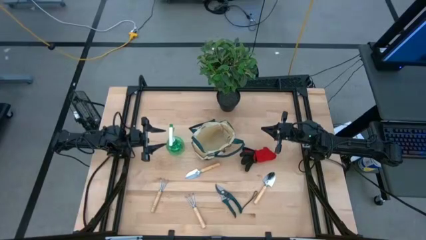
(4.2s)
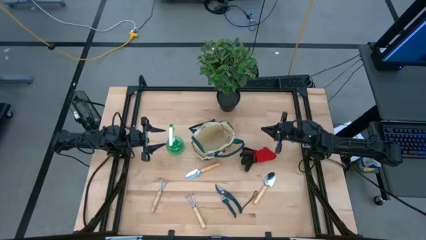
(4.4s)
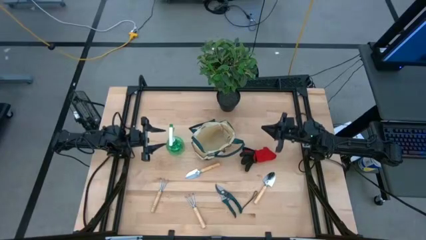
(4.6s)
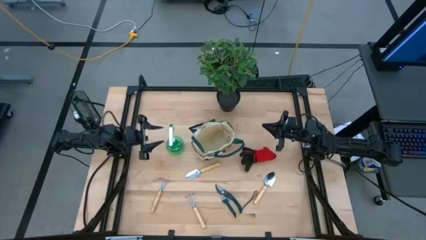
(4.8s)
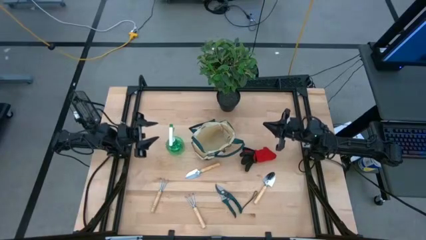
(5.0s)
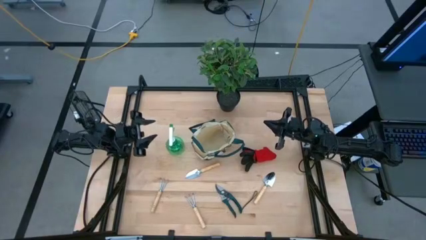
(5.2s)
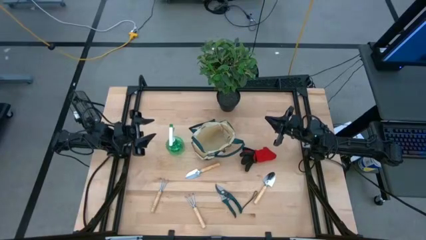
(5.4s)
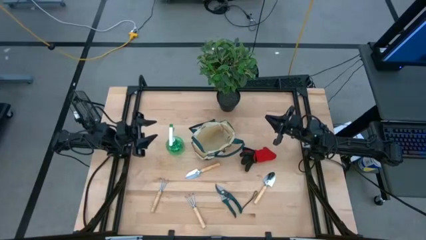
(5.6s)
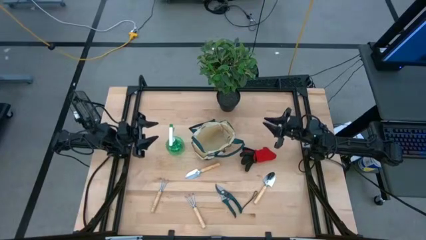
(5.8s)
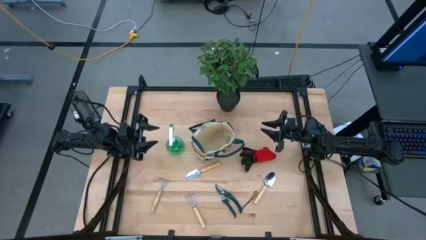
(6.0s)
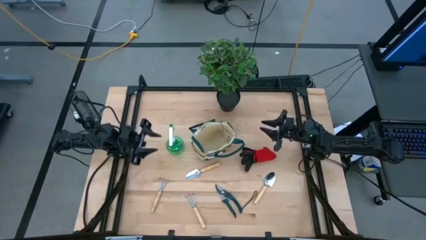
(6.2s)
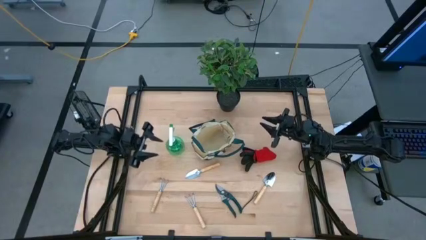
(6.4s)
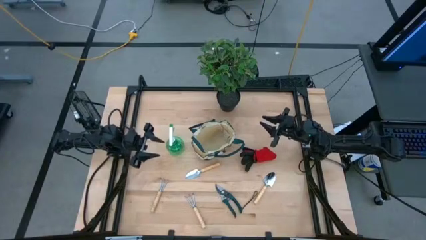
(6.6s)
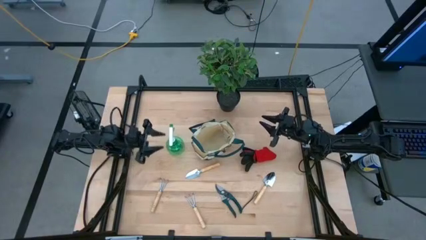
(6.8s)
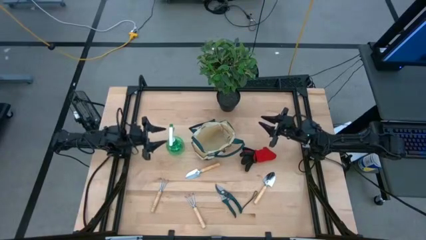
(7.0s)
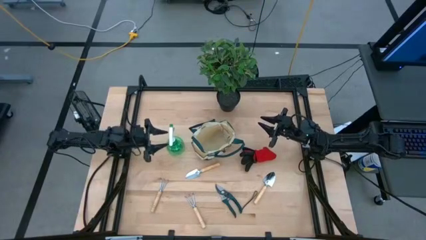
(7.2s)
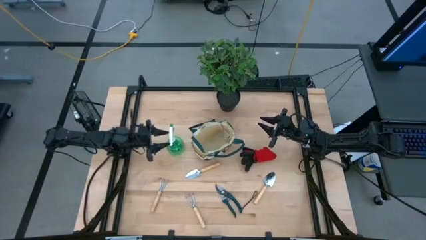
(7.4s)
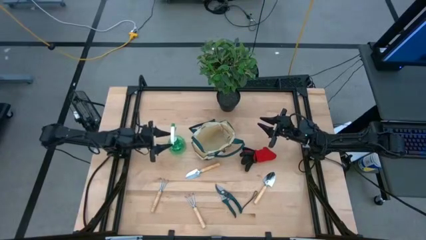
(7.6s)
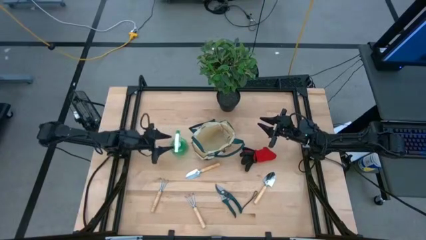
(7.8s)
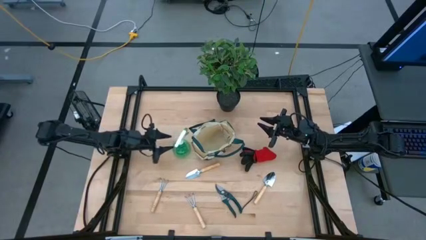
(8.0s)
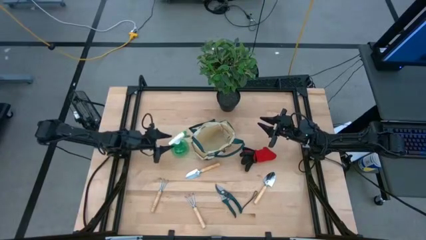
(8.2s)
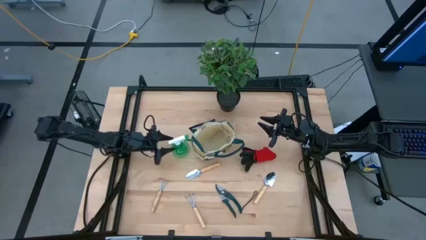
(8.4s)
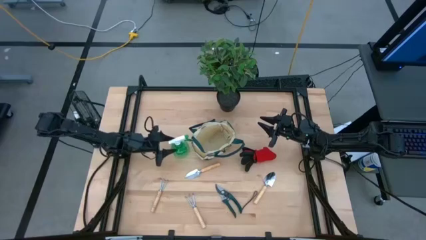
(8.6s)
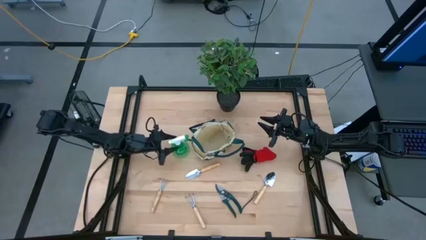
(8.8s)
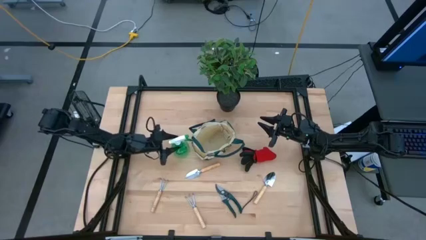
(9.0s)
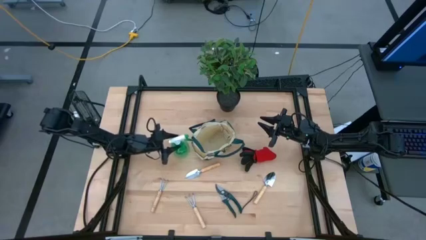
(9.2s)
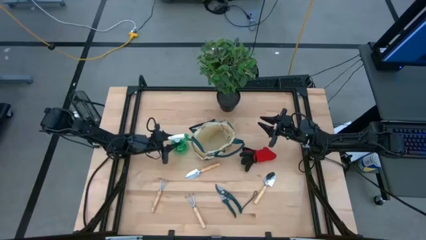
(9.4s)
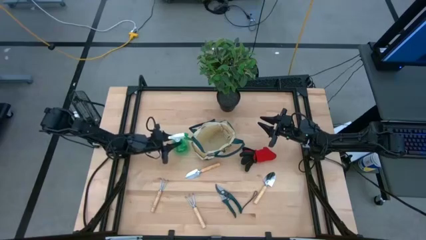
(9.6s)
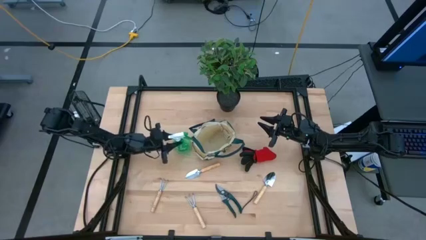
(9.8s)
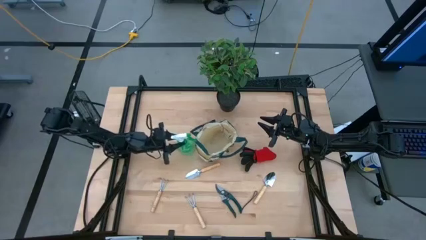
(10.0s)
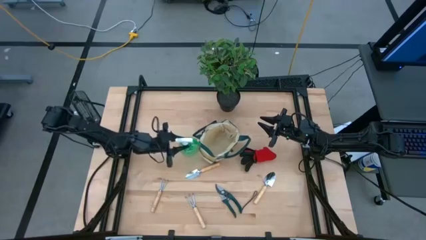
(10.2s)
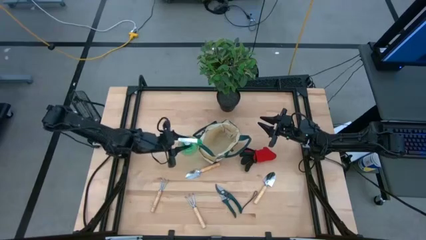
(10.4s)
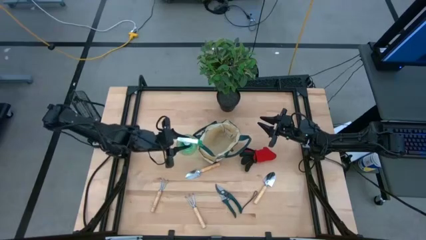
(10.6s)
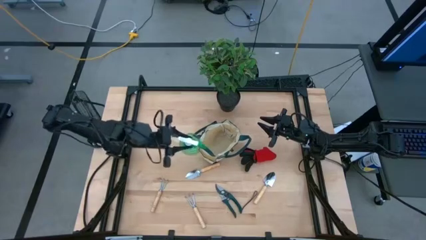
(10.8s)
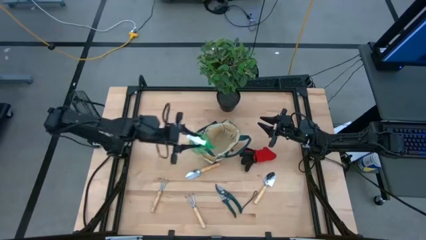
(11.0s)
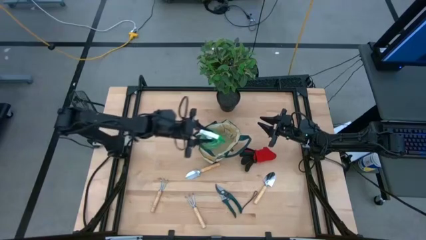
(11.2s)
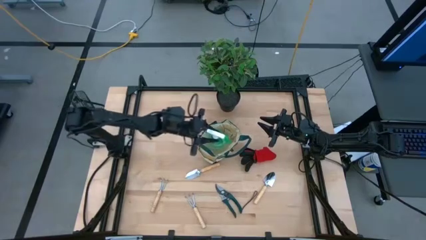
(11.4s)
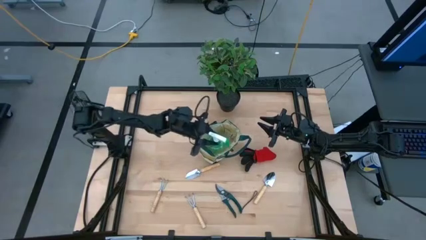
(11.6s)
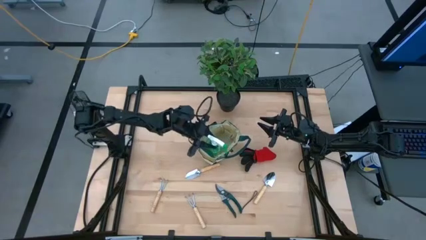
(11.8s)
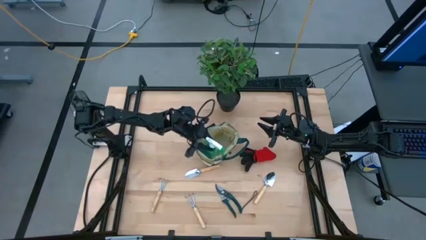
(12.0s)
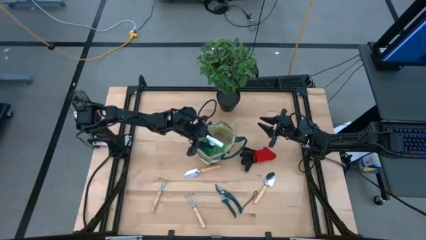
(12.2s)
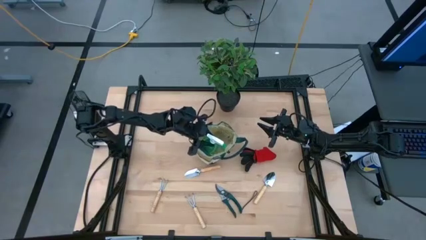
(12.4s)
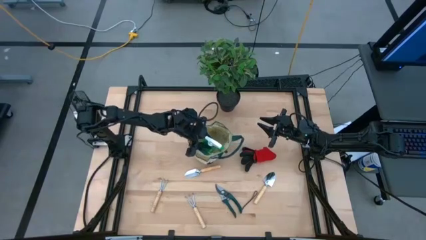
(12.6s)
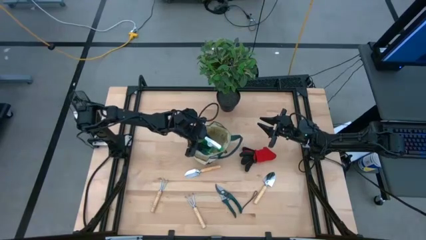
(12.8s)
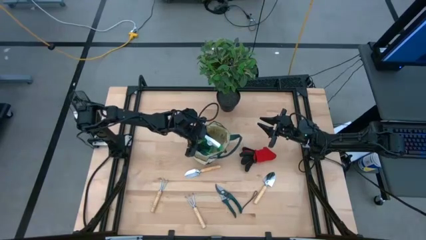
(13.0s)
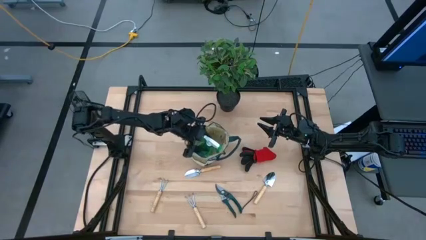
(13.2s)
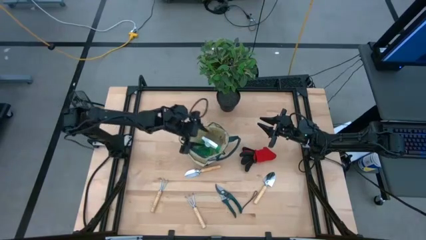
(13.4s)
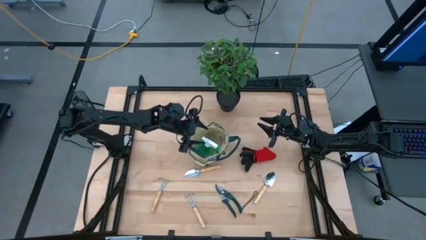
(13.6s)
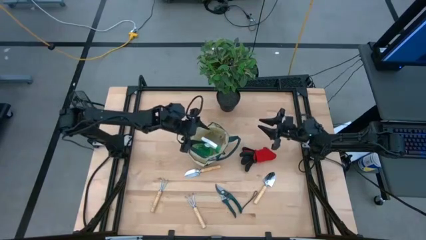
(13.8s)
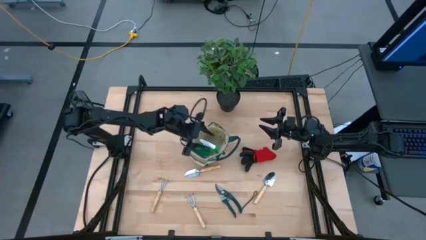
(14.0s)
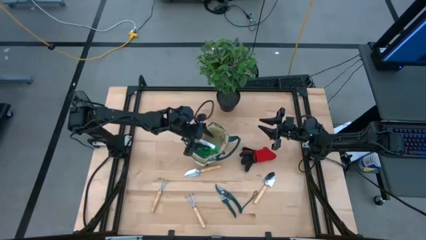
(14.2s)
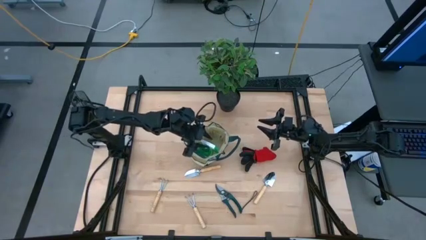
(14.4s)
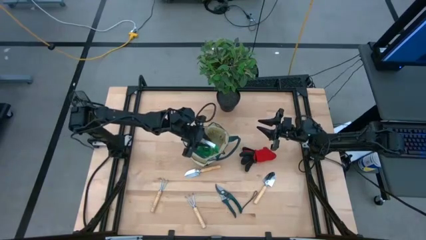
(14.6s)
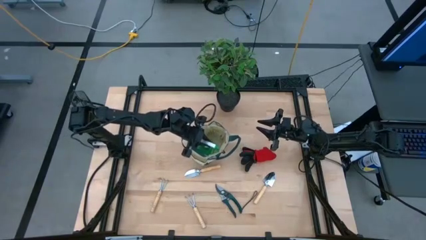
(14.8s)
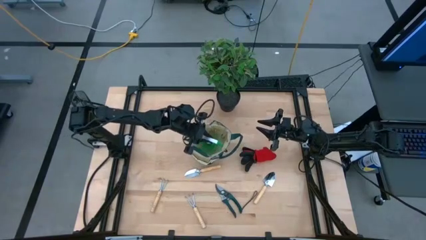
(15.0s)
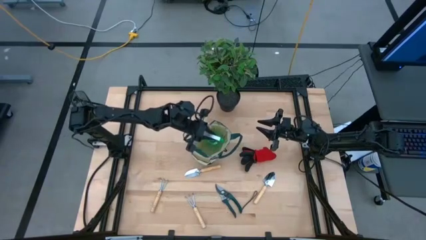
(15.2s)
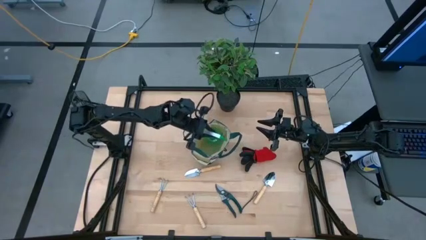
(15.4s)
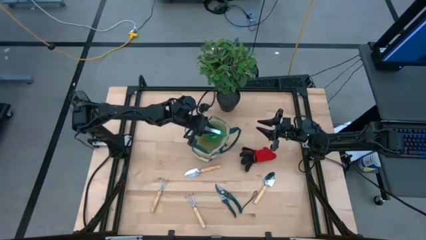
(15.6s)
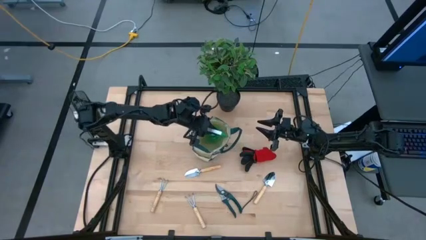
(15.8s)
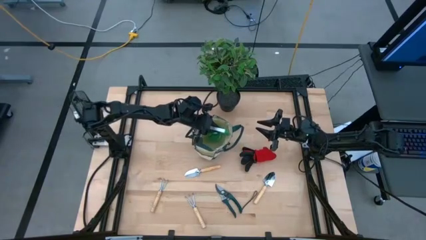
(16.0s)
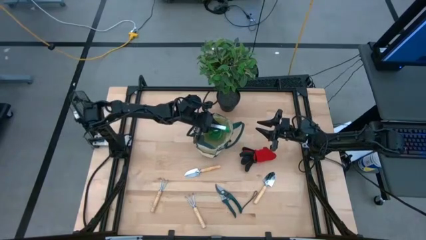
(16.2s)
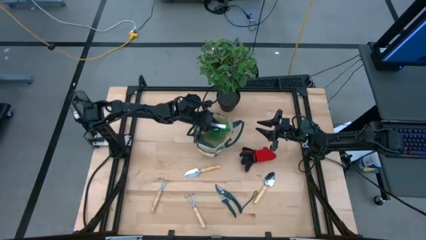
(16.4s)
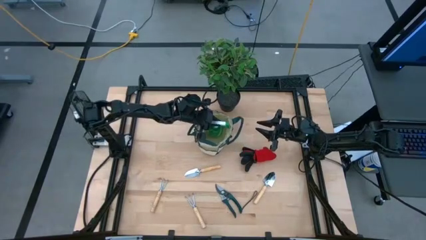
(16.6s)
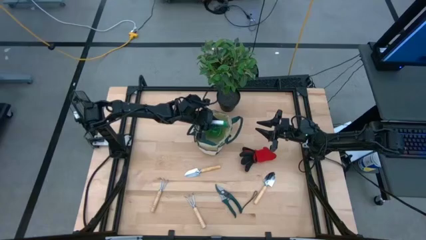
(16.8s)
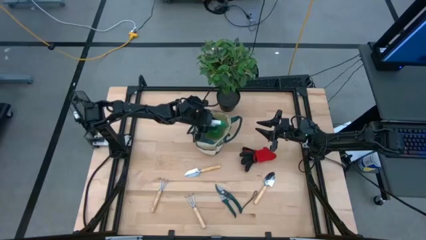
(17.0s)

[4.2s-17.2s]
Task: Pick & Place Garden tools in Gardening bag
Put the green spray bottle in the gardening bag

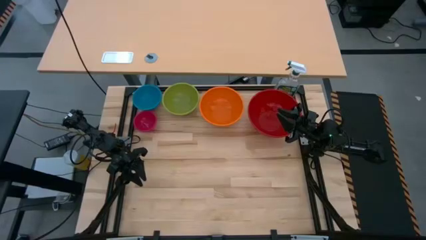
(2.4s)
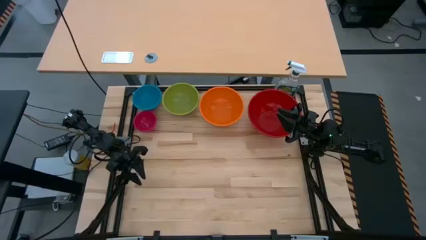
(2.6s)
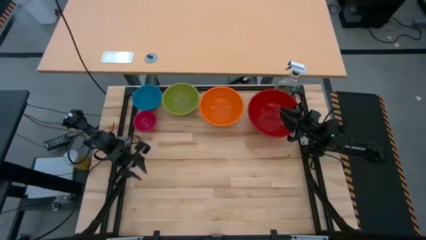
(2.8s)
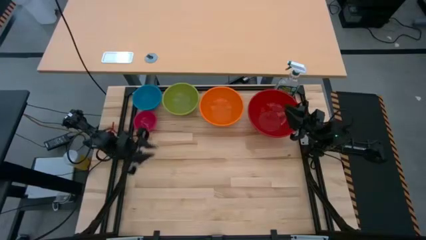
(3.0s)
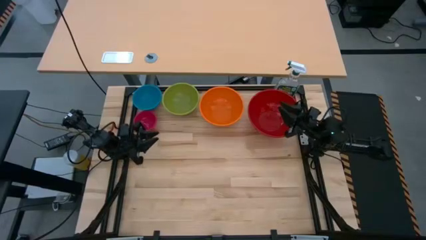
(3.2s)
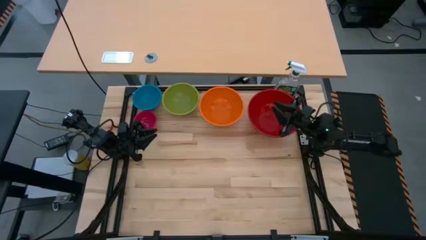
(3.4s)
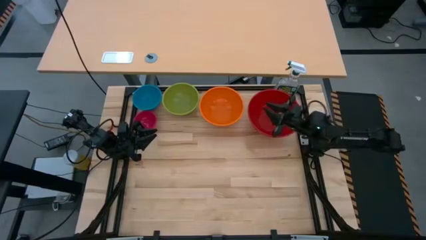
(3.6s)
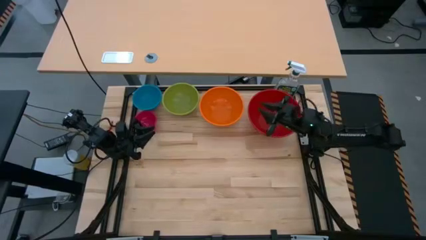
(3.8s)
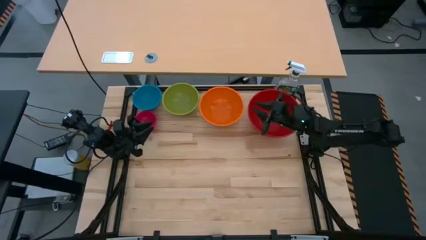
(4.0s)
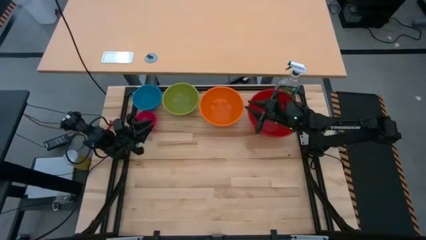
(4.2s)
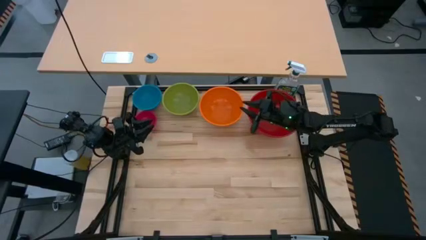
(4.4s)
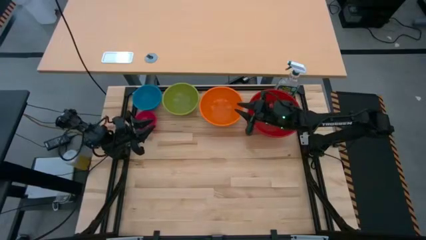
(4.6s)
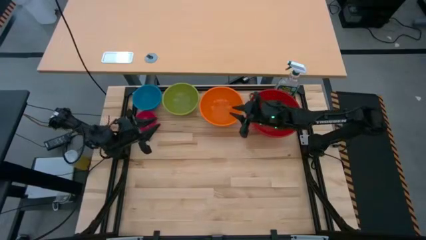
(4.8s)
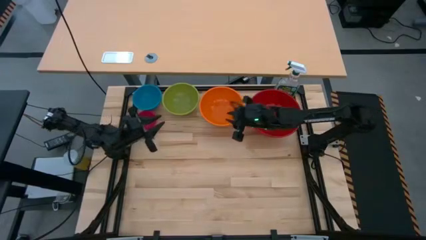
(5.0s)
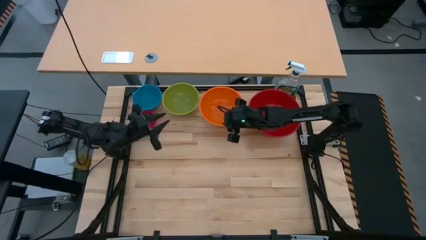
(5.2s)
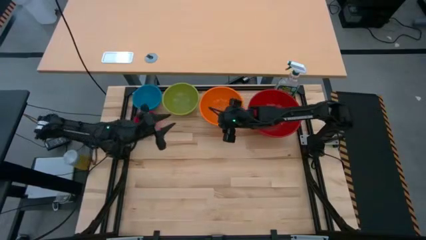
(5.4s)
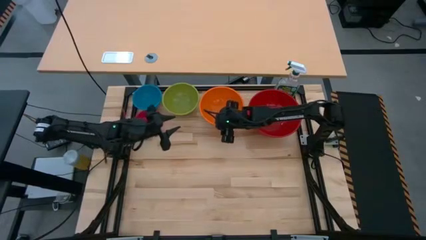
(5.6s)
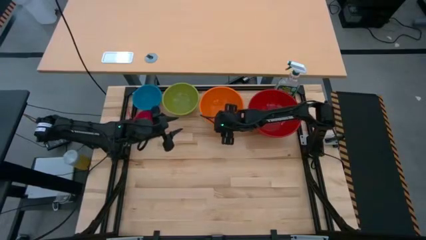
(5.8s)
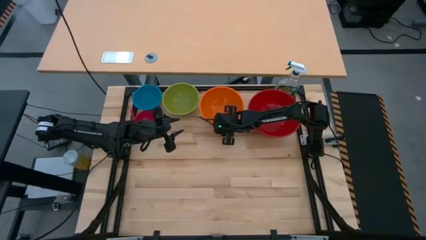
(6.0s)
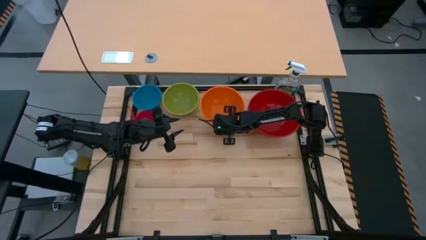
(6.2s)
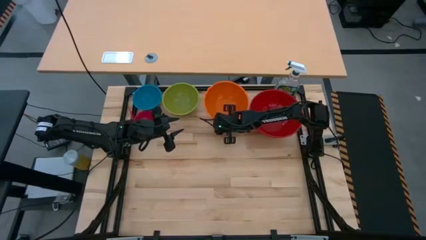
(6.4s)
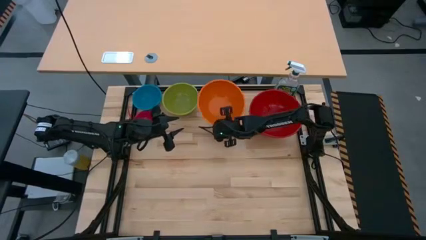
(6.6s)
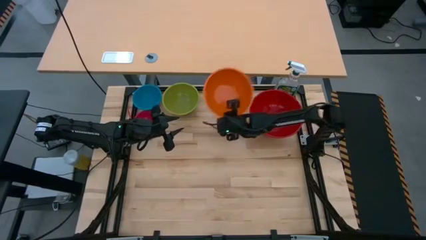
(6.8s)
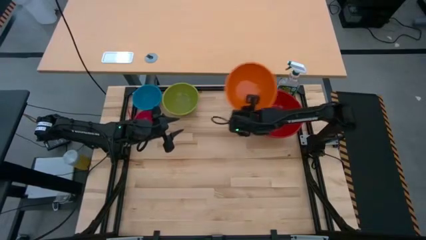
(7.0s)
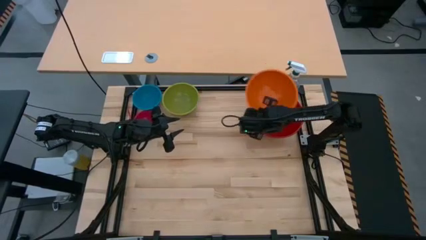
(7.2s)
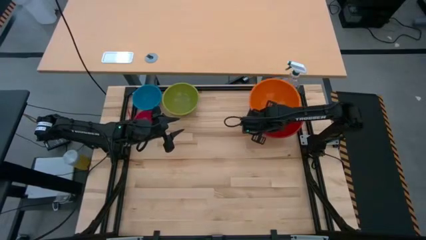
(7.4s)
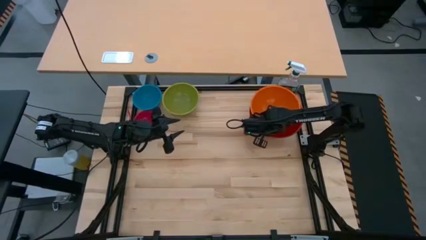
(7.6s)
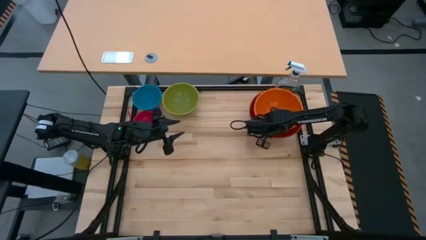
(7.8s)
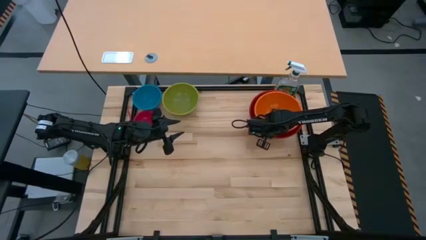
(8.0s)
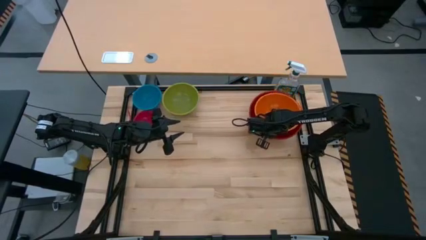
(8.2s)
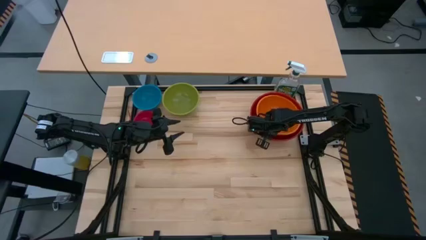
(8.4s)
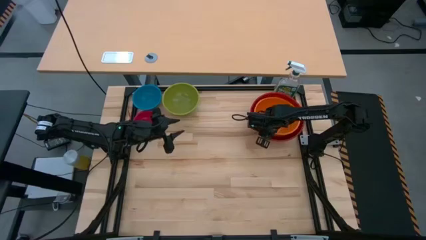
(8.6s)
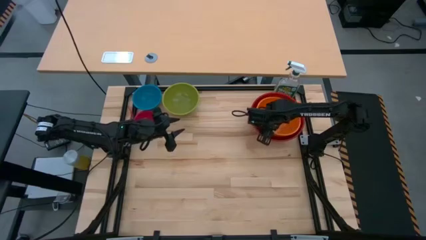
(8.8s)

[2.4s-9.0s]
Task: Nest bowls inside each other by size order
Stack the orange bowl on top of the red bowl
